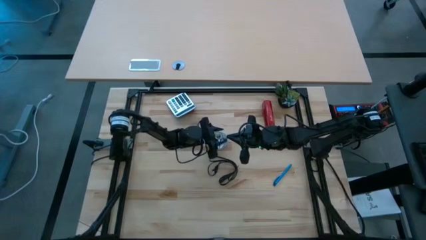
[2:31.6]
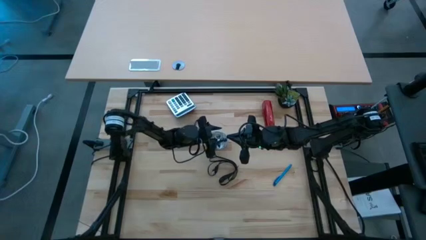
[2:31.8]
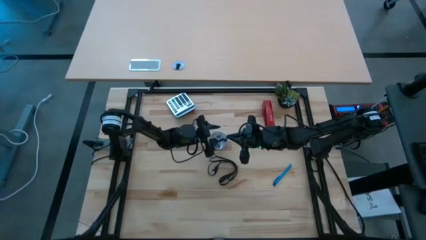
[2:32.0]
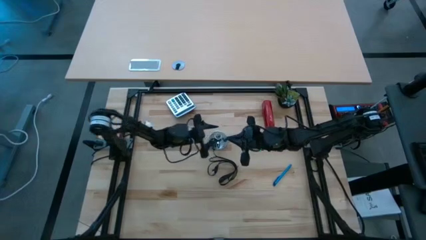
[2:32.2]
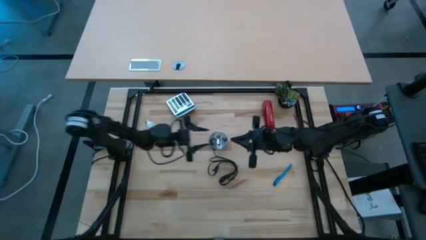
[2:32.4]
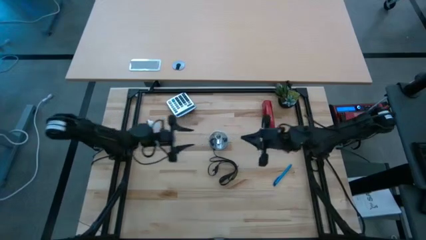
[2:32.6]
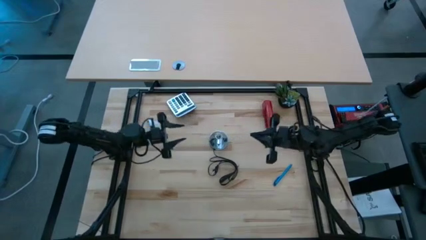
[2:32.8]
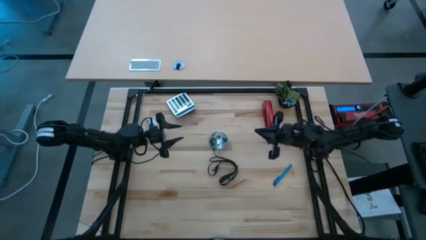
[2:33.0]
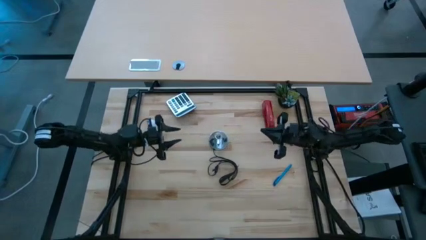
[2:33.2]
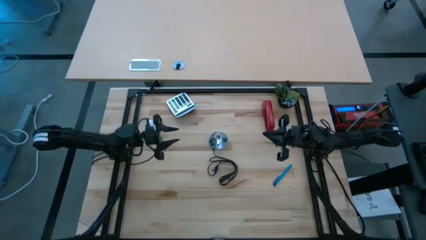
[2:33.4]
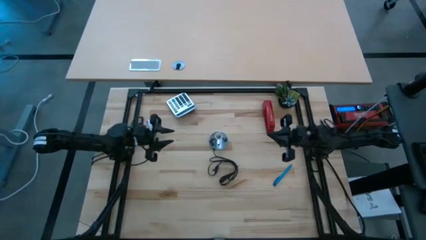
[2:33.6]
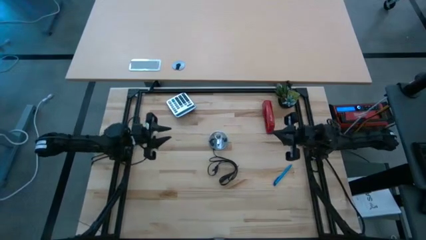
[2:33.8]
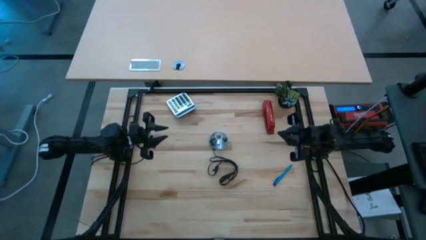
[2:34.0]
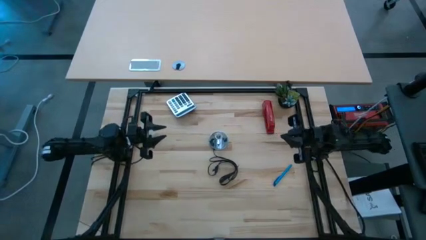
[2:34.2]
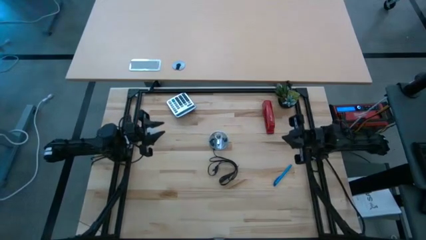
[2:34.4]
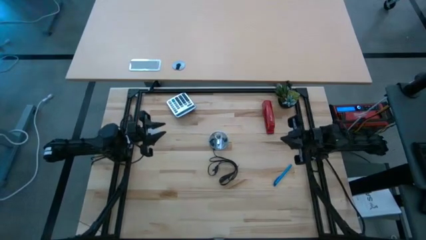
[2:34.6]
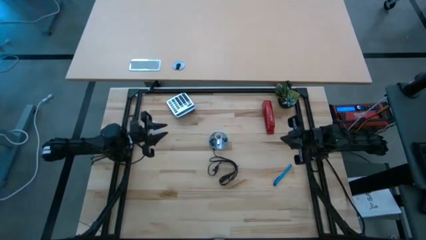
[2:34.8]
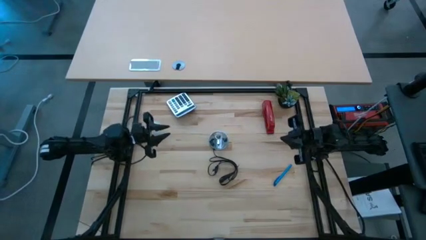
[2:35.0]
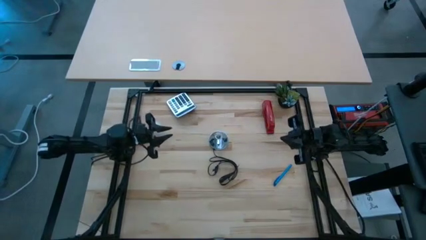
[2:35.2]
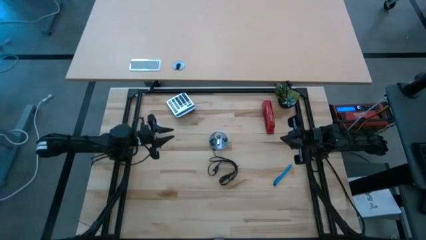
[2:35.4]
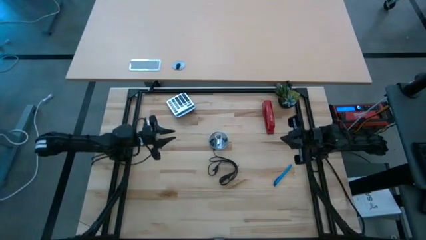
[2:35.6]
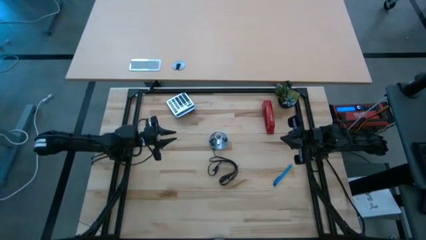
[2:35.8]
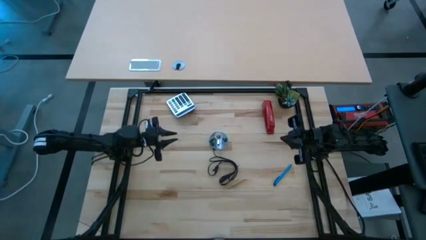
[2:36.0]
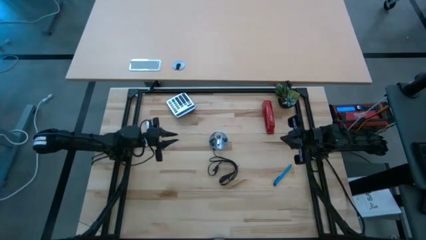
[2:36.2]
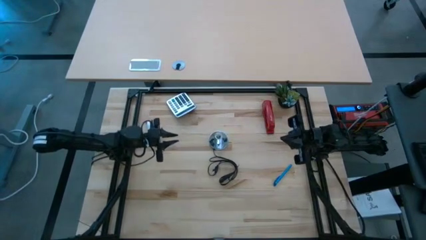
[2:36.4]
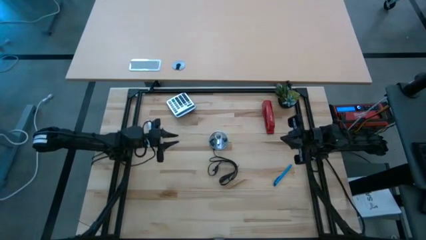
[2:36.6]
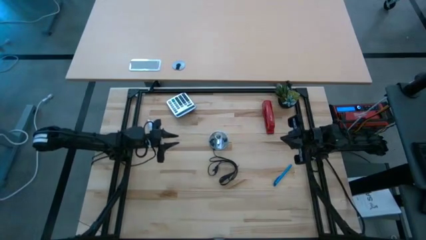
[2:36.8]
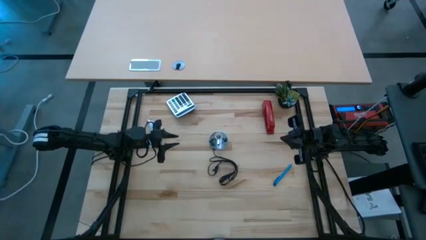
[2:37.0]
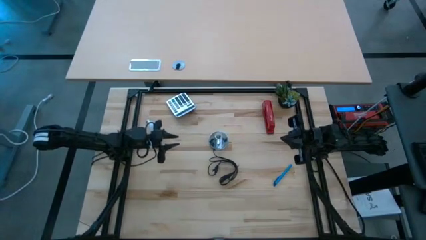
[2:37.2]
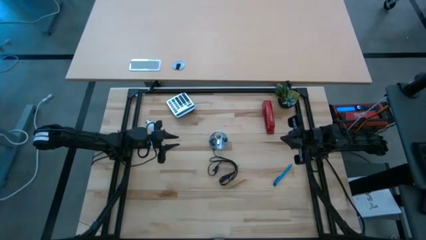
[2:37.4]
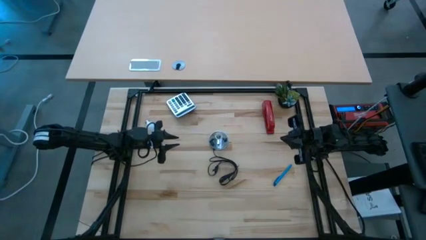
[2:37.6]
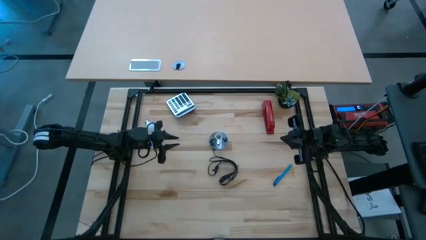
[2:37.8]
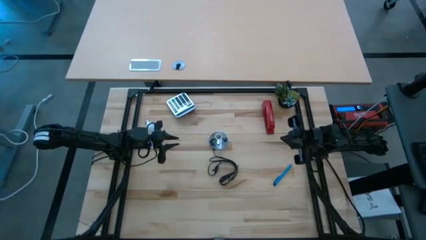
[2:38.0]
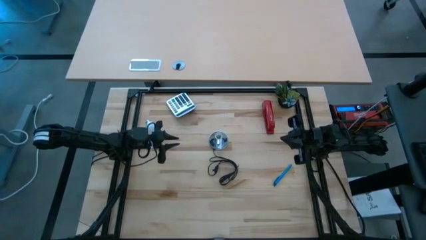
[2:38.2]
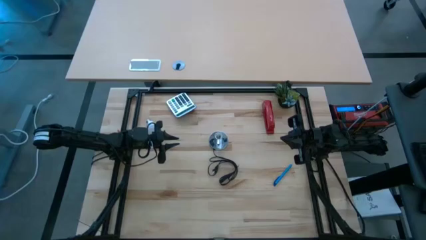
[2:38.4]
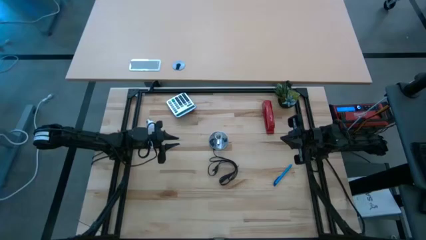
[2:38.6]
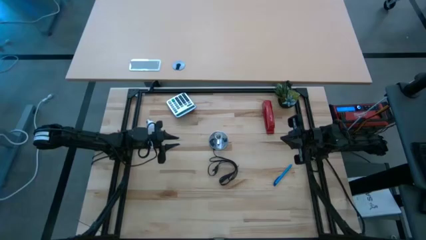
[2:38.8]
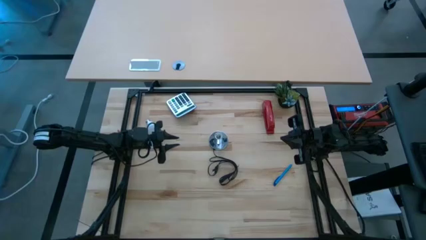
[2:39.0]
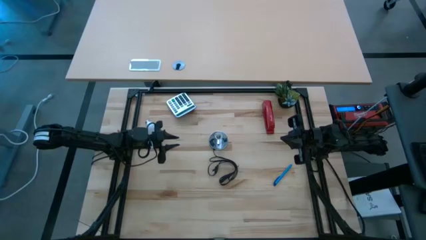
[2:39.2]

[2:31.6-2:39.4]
Task: Screw lightbulb
Return to Home Position

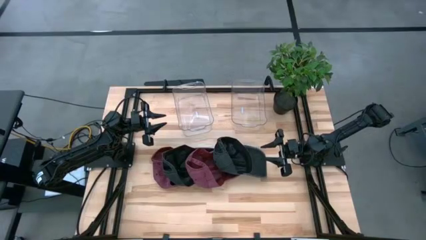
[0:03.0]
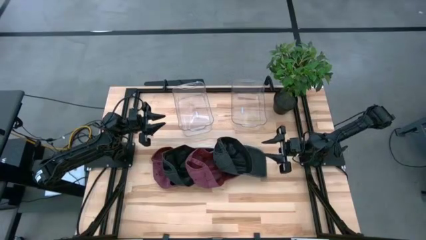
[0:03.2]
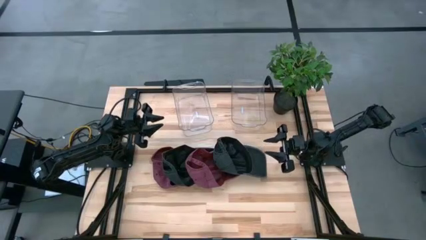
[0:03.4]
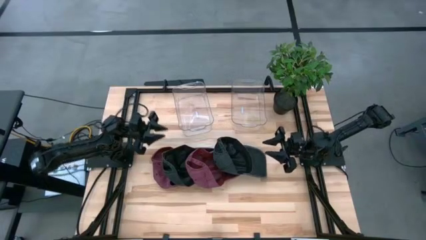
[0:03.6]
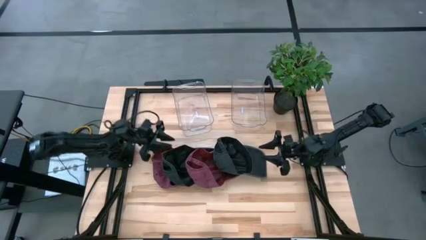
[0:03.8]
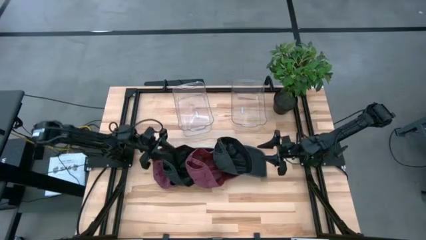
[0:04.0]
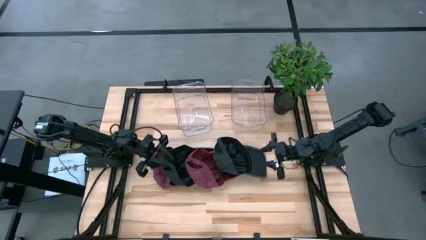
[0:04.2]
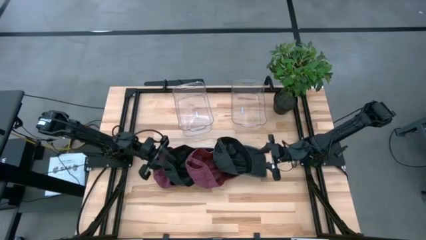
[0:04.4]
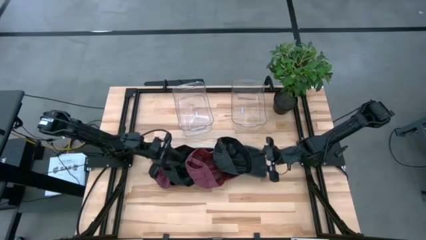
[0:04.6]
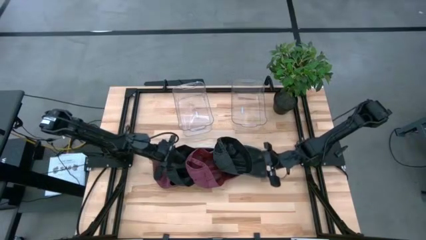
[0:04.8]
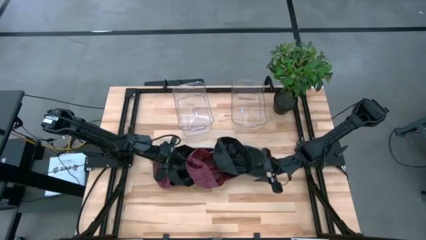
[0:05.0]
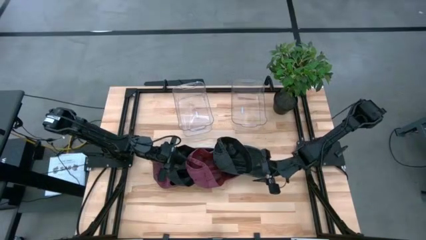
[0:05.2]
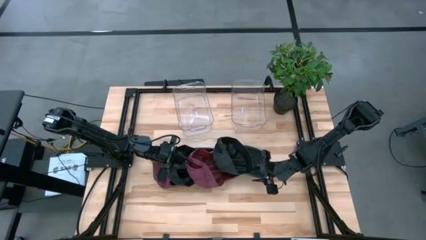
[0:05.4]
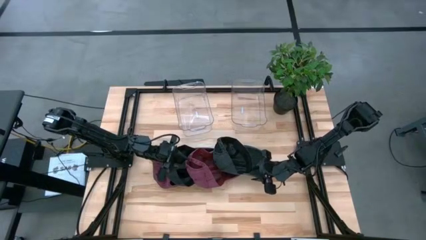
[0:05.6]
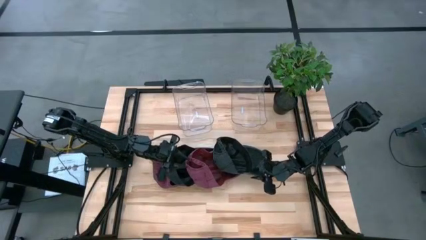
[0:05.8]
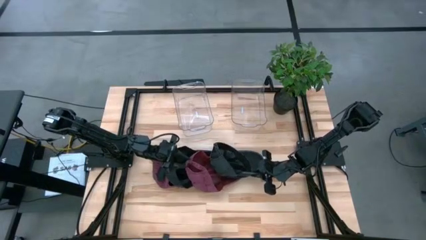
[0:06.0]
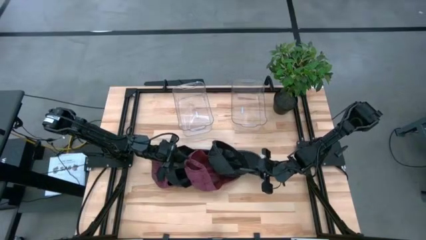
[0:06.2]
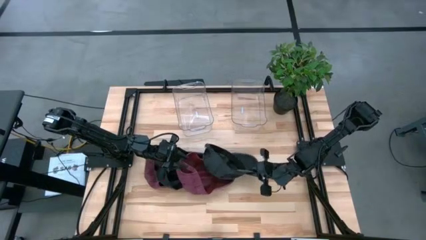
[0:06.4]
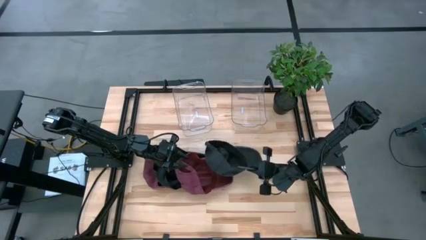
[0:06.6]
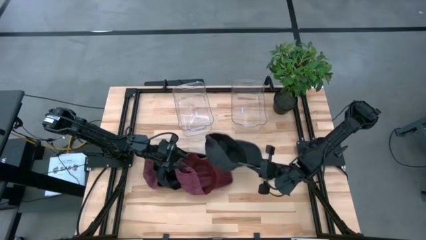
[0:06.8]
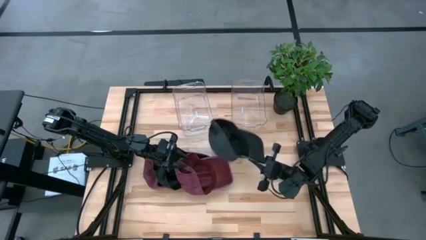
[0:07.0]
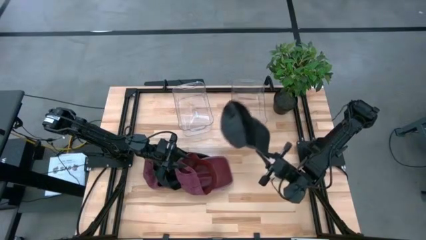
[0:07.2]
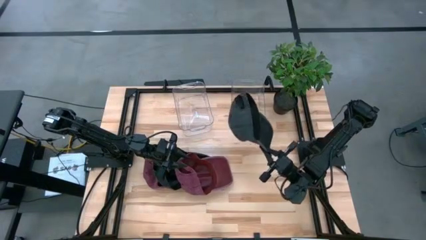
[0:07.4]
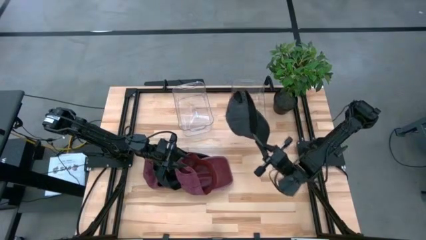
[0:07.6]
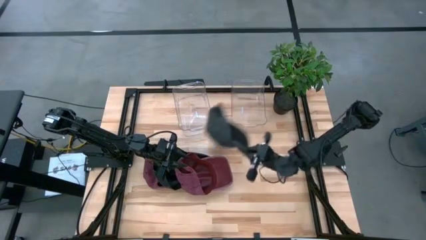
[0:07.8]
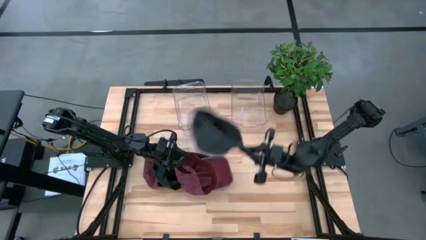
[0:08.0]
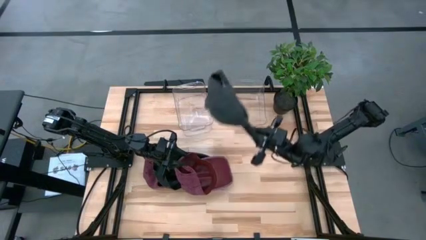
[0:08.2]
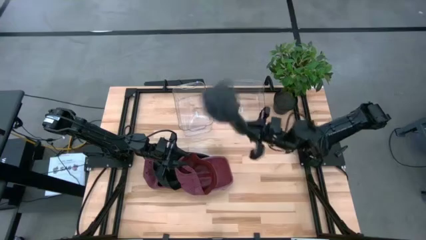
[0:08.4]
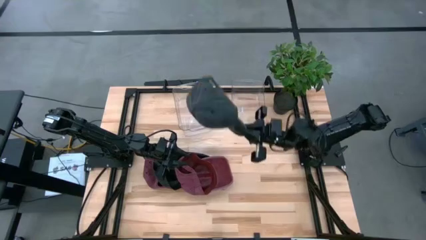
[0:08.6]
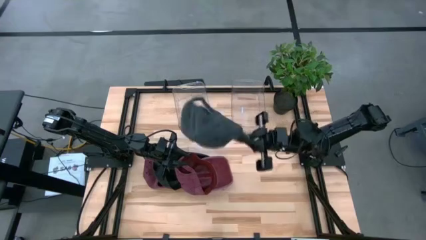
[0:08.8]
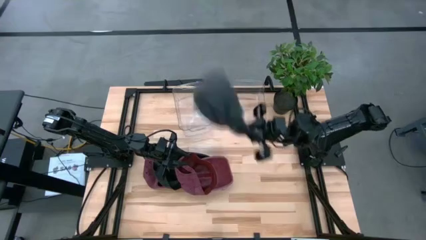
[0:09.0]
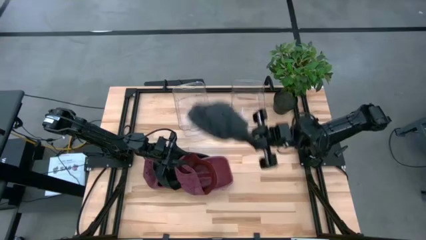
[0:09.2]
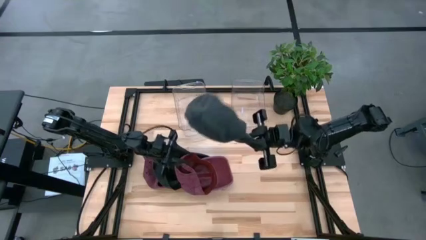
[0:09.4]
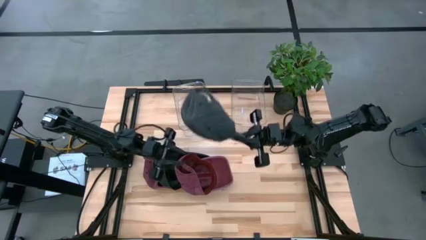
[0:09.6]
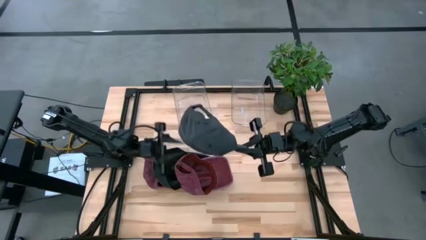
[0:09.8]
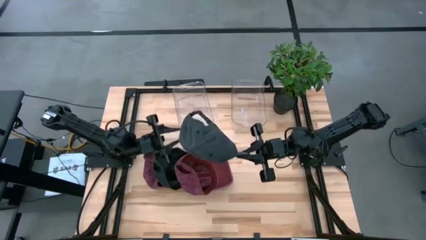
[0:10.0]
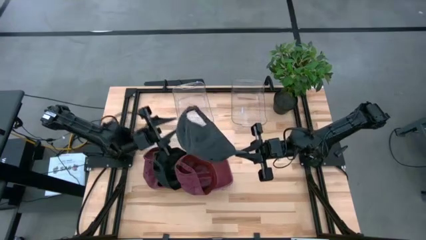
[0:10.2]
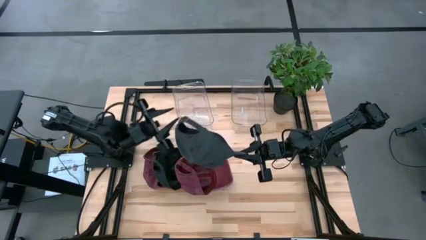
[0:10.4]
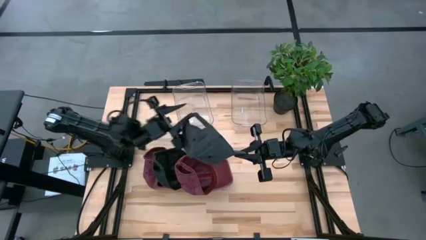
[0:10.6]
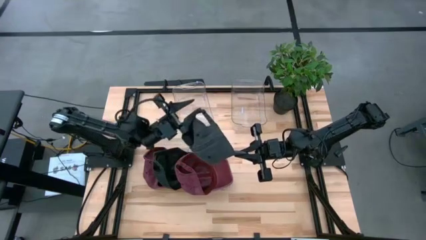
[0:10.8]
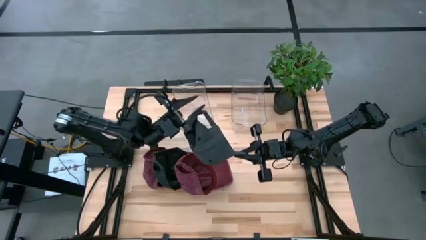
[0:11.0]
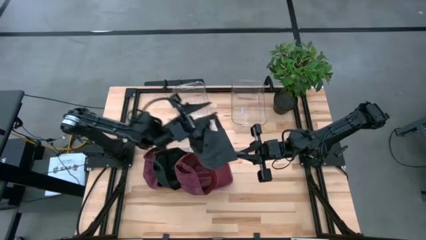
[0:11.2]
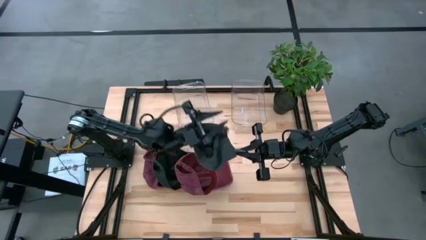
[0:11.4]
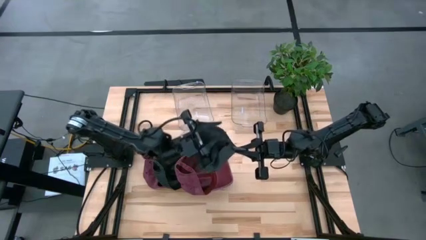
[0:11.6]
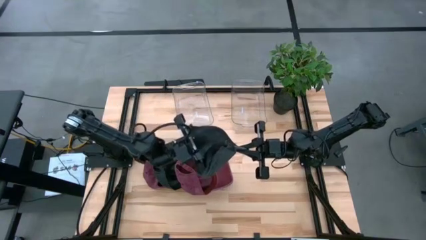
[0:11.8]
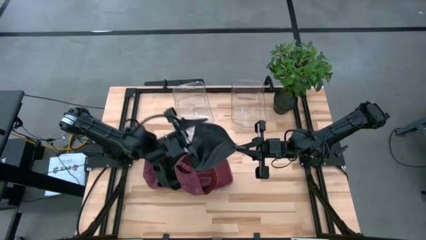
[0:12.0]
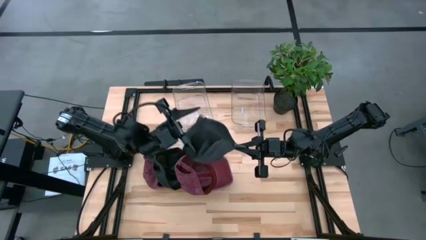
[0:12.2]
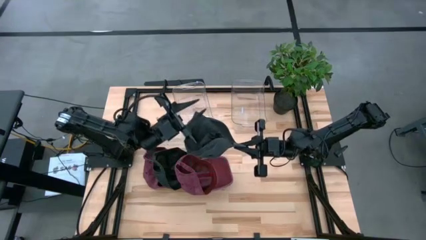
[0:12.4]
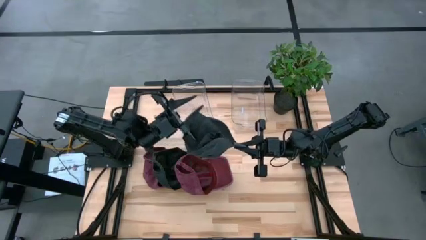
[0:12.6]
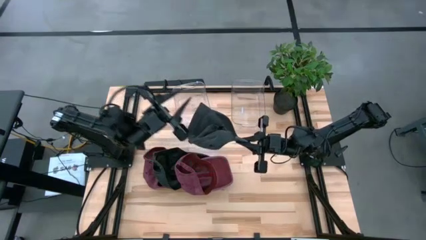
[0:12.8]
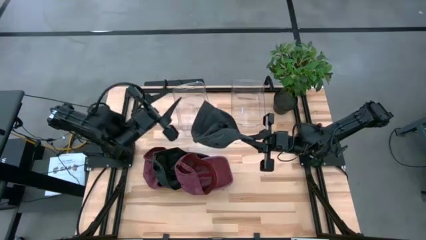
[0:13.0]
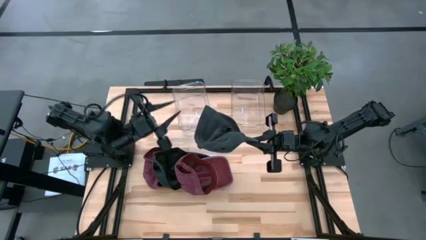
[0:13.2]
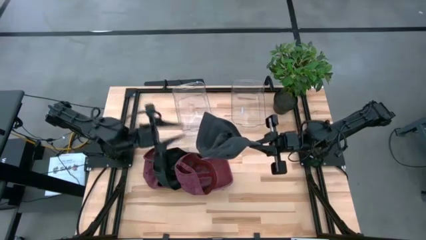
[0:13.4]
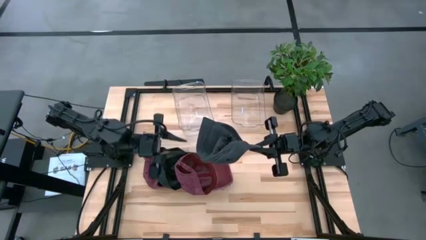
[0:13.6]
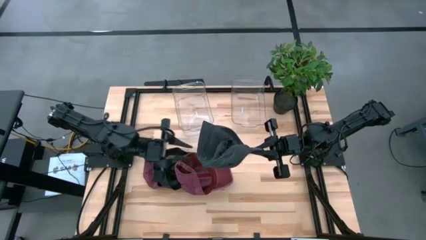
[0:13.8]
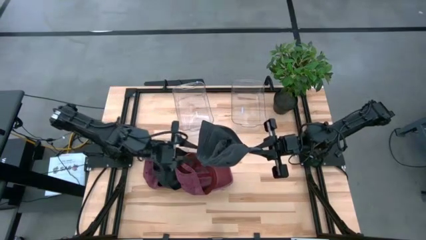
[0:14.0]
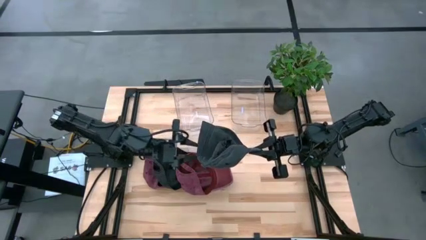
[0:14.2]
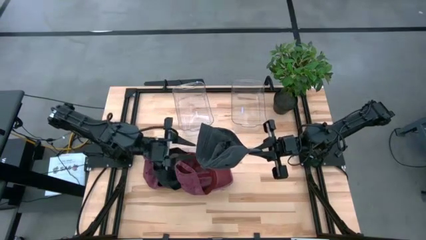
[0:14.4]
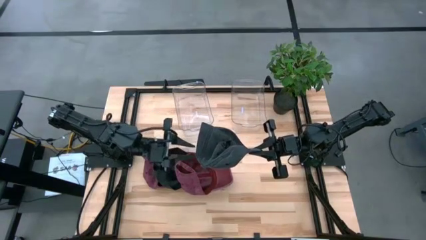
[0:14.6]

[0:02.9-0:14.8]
Task: Pick & Place hat
Put the right black cap in the right transparent bin
